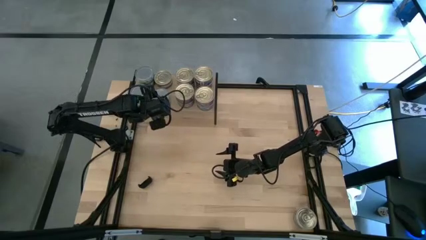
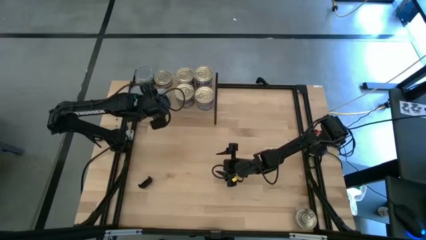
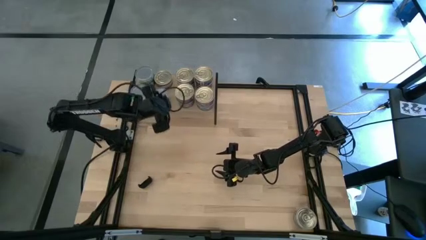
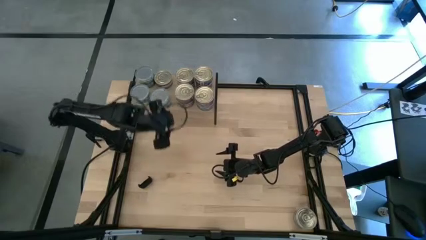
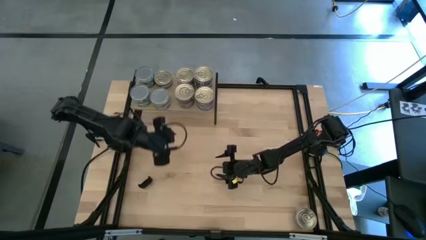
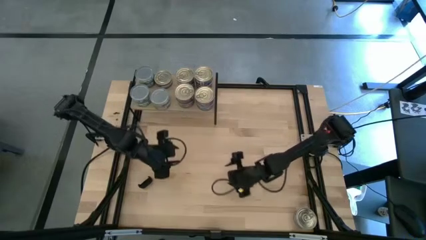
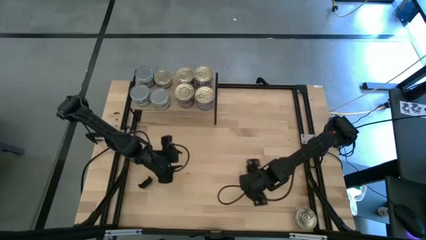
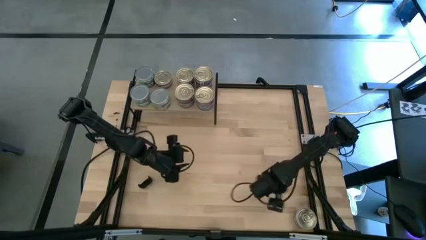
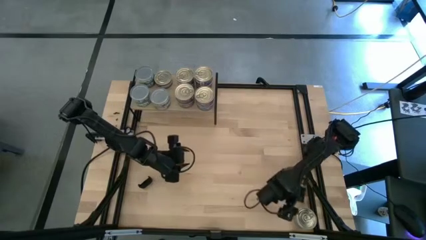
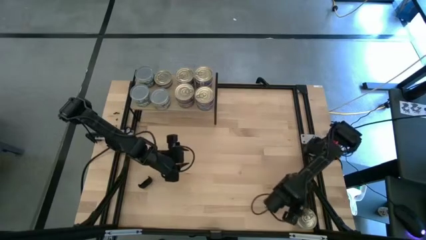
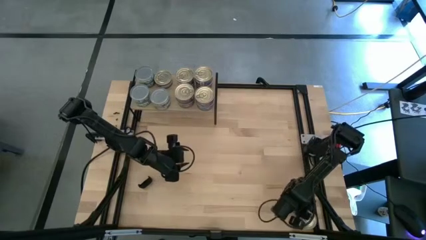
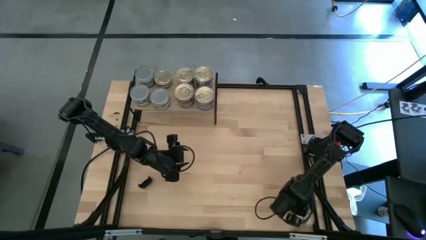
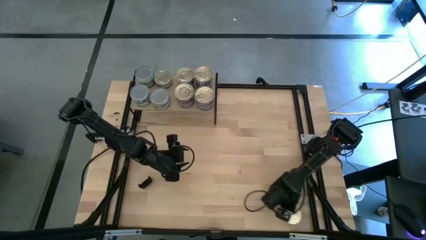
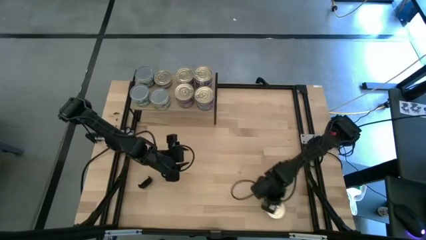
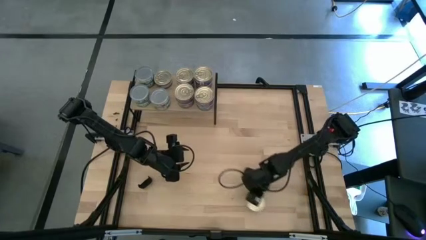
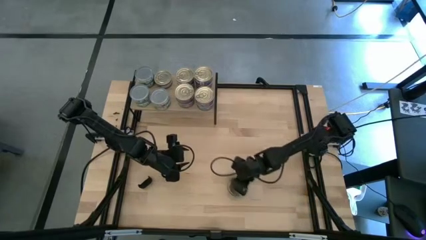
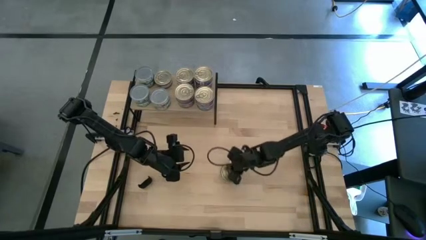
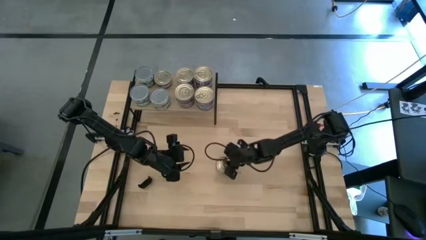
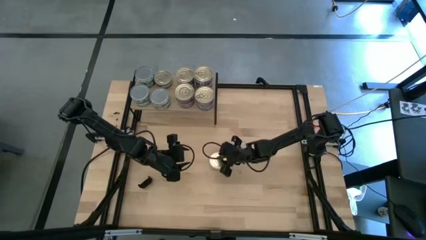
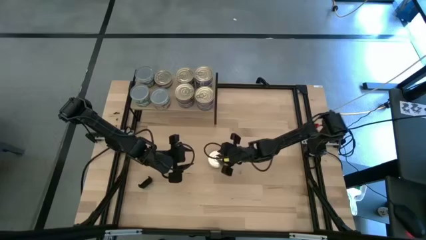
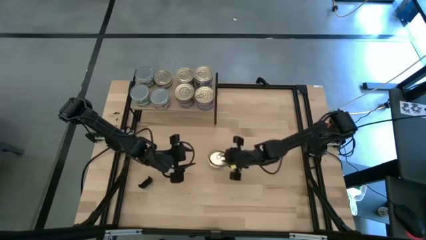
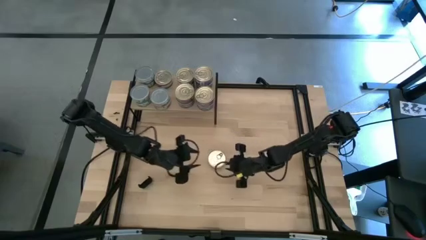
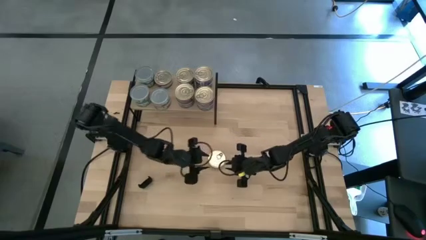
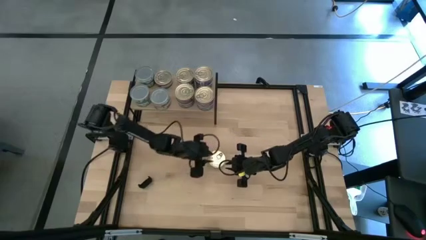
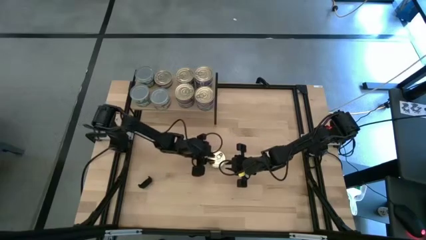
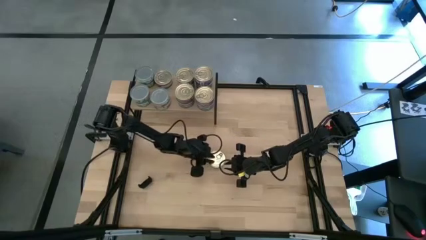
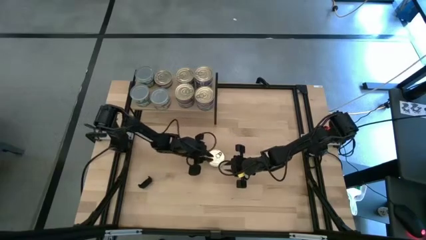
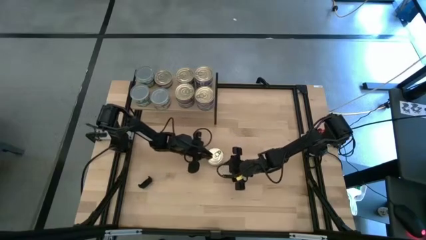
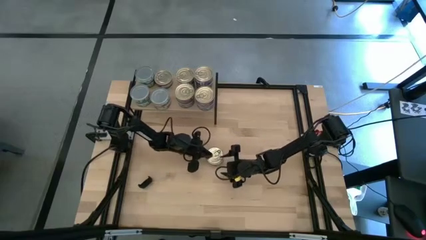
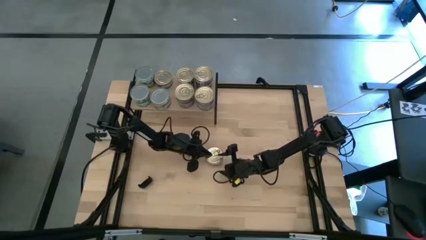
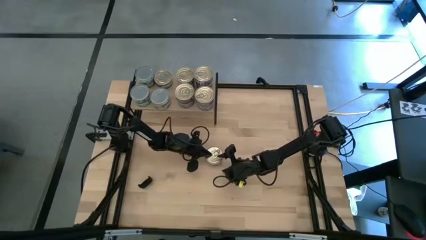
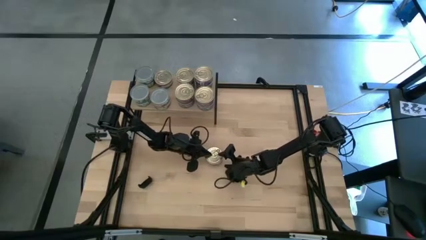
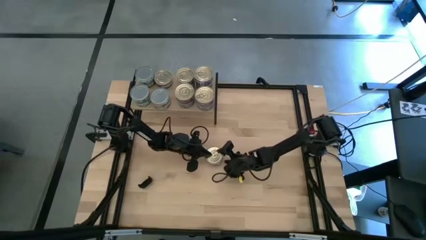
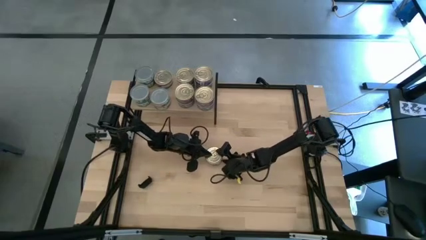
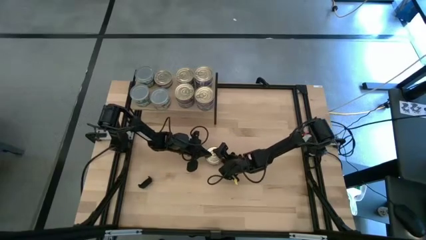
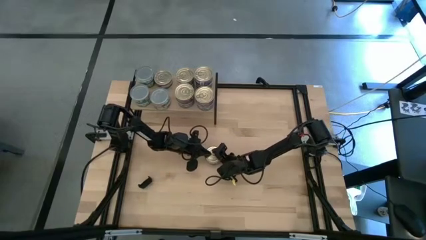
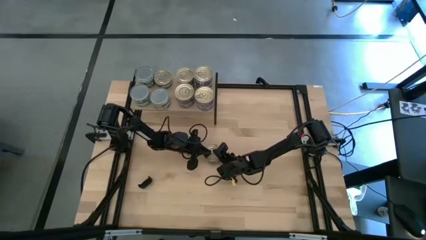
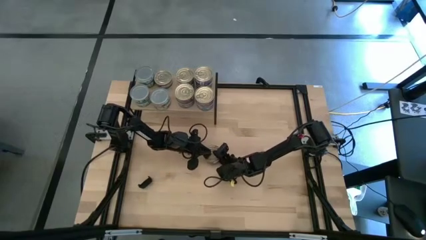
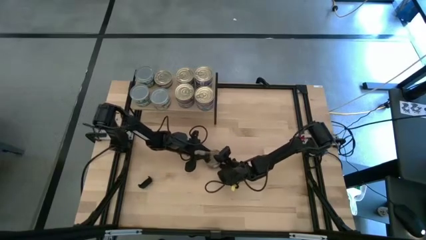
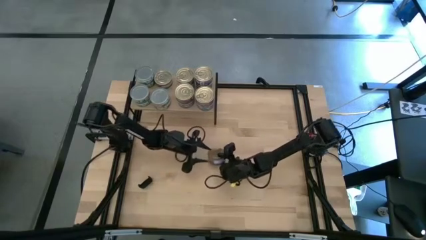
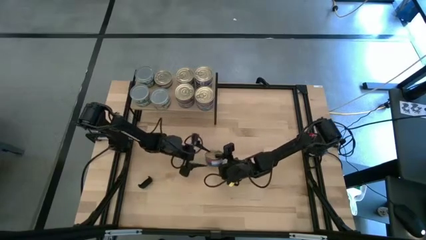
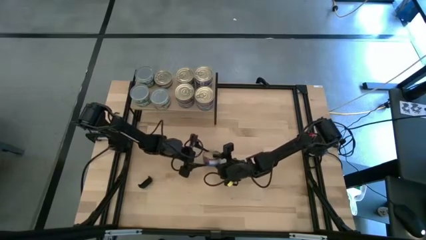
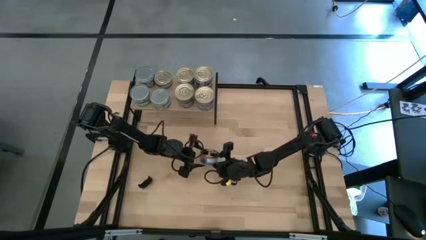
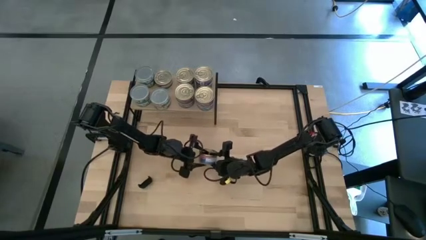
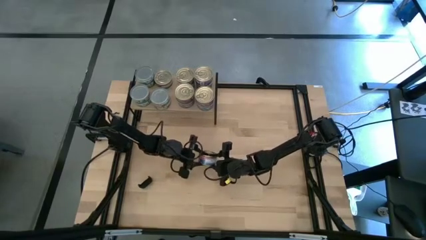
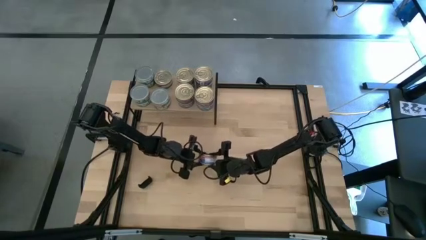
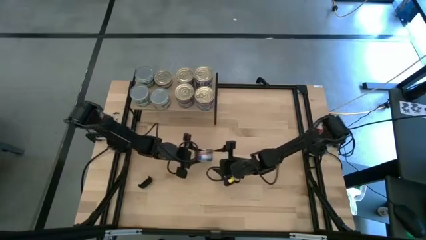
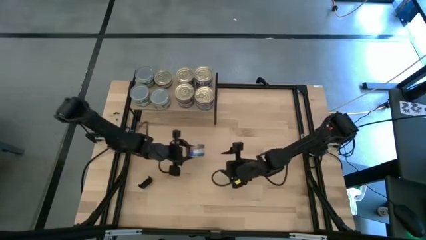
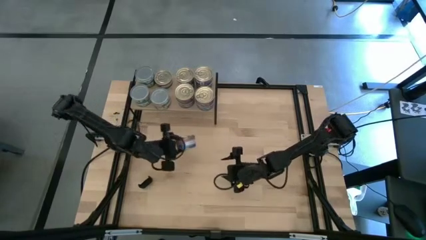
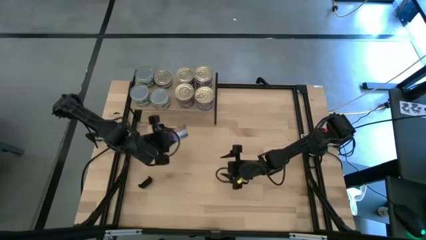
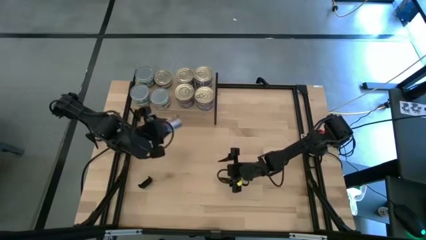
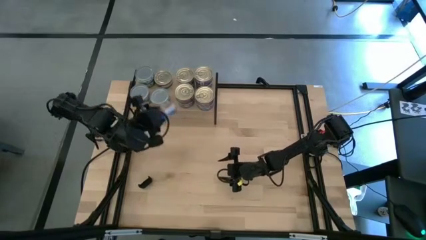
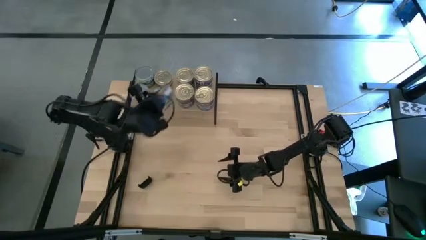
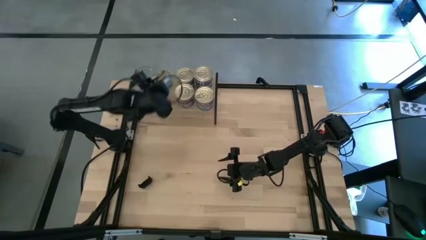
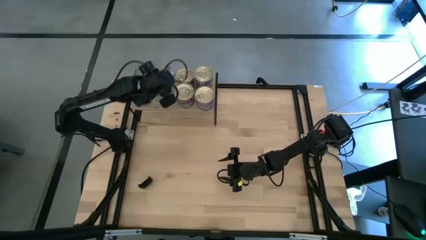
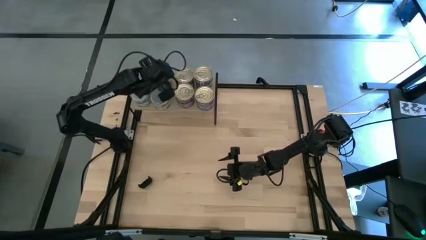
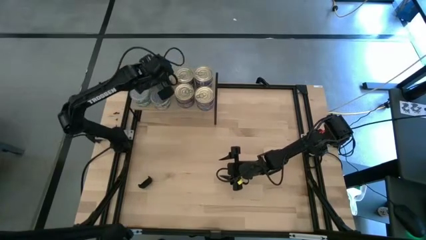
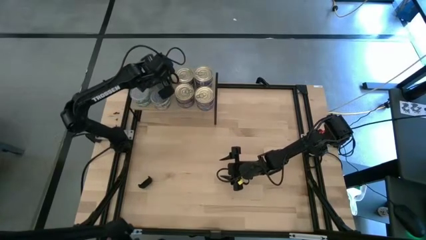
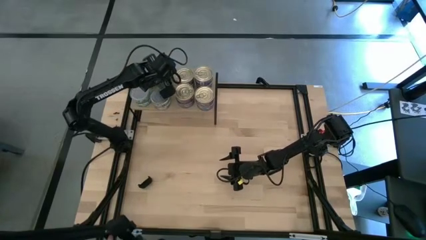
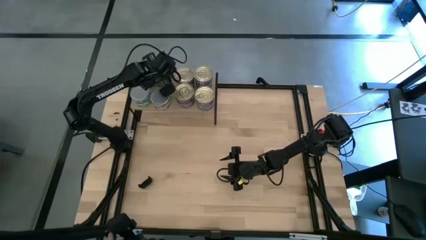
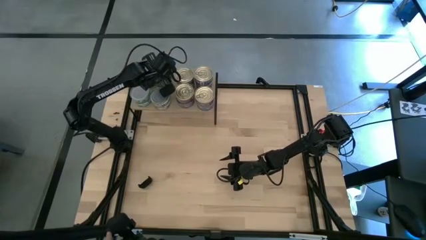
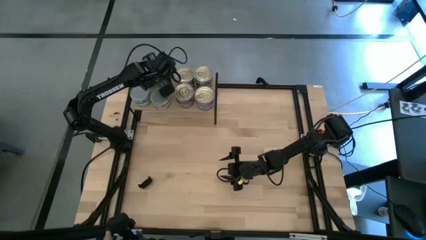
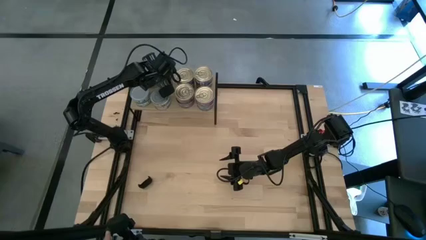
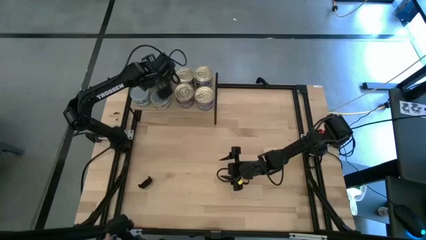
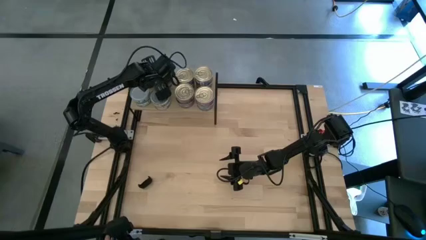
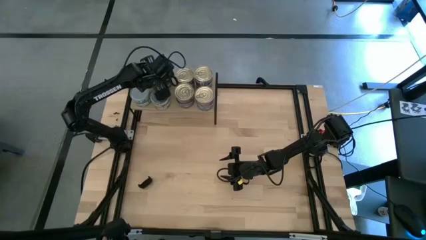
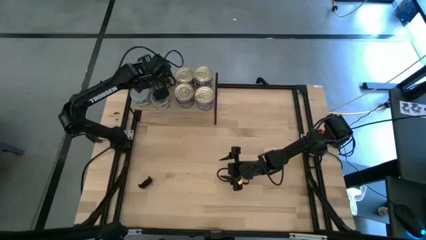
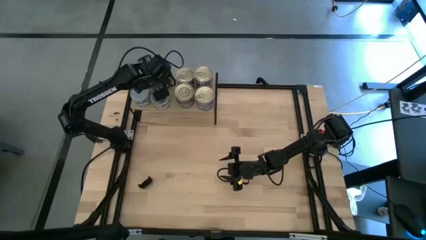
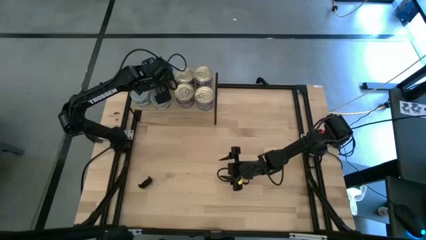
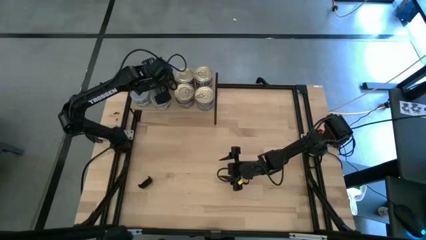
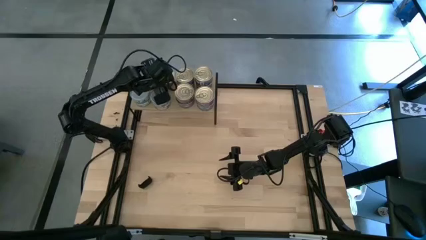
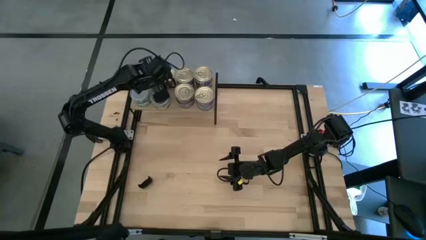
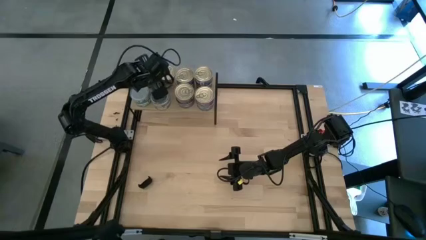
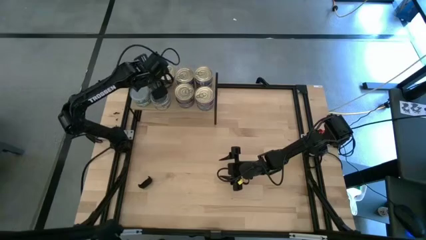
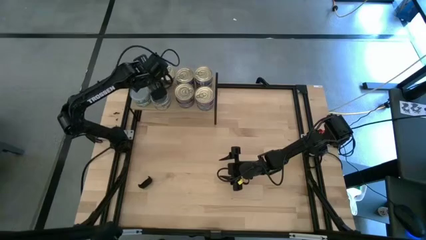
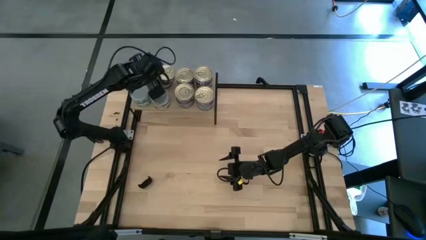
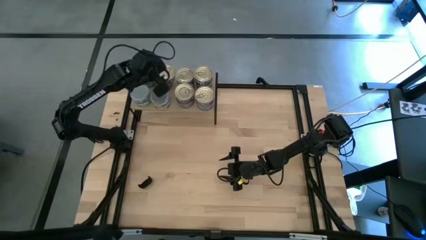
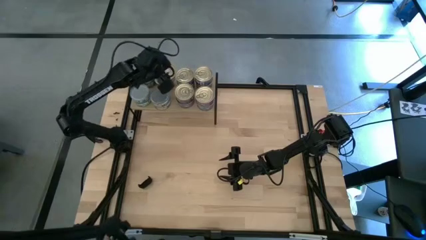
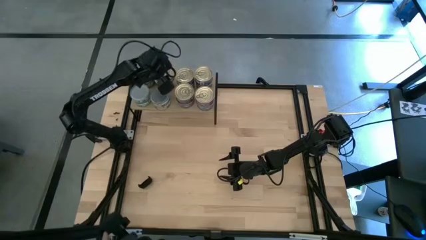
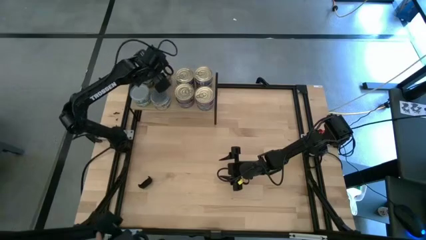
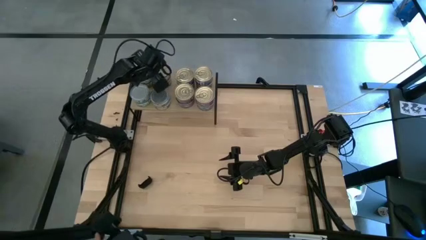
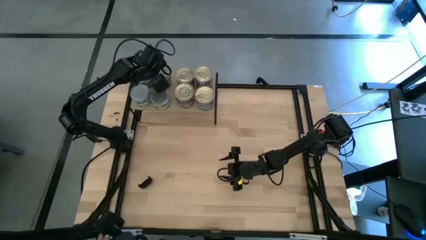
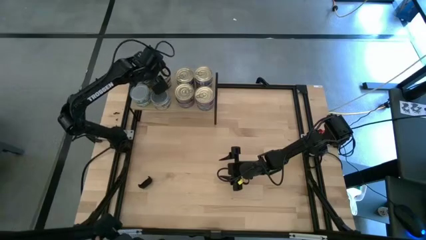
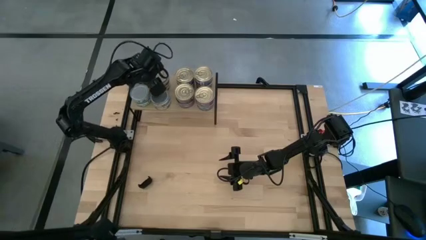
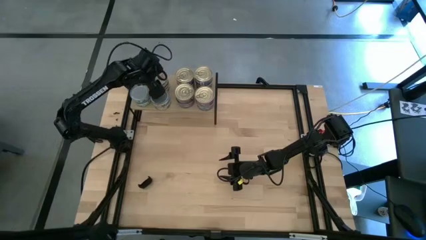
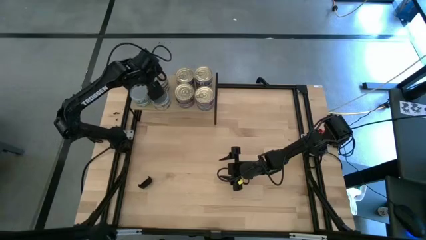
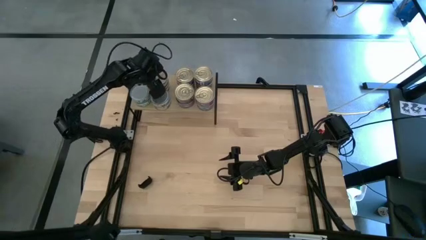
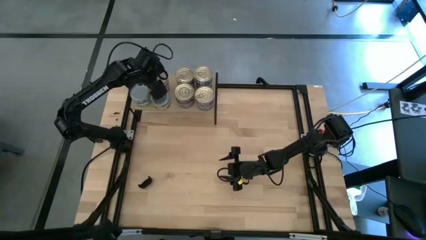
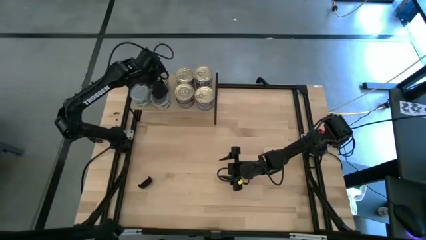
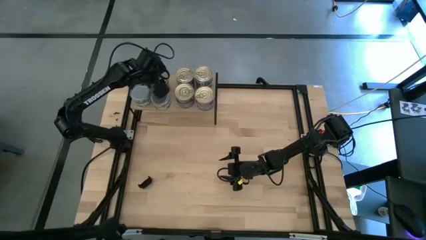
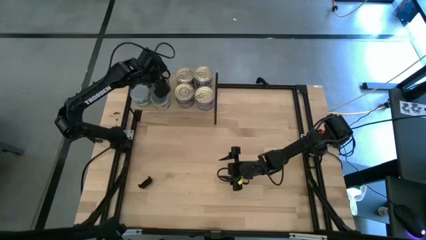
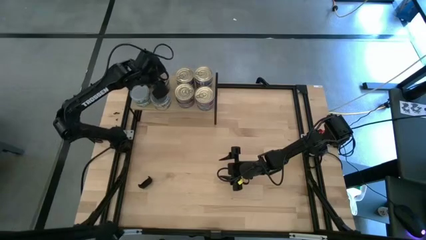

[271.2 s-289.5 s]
Task: Stack canned seafood by type on shelf
Stack the blue tuna can on top of the blue tuna can on the shelf
